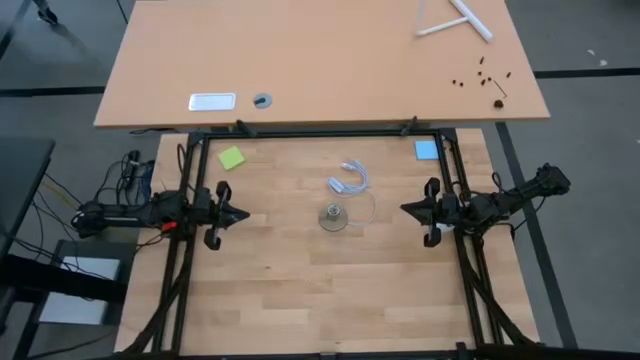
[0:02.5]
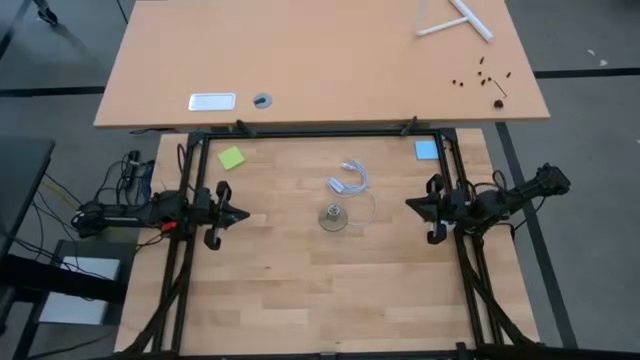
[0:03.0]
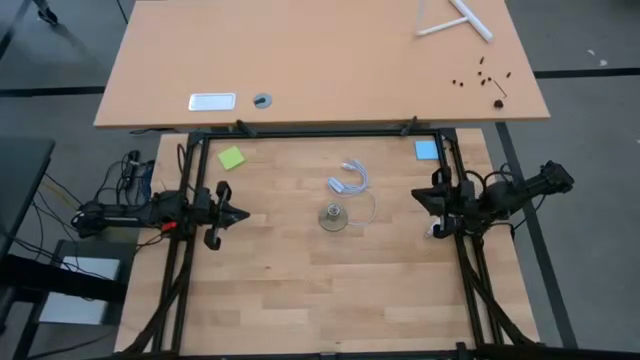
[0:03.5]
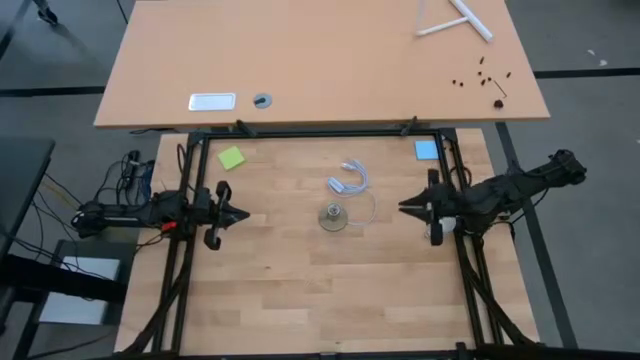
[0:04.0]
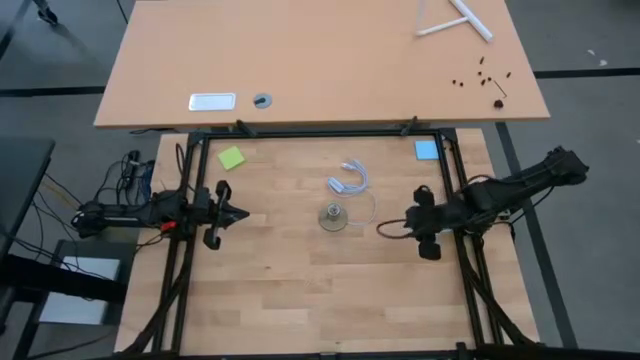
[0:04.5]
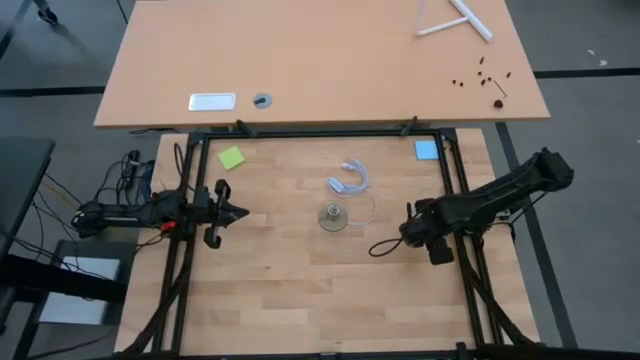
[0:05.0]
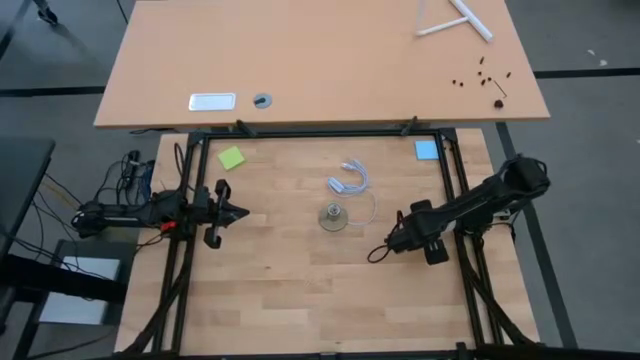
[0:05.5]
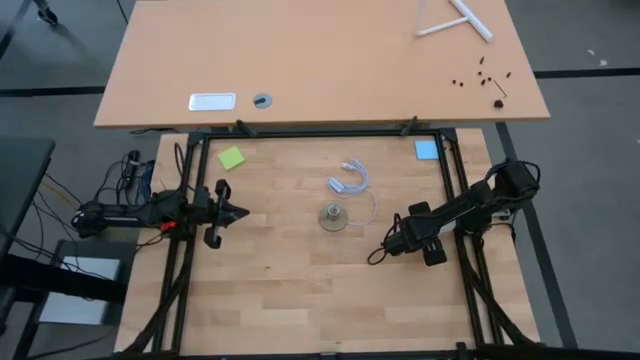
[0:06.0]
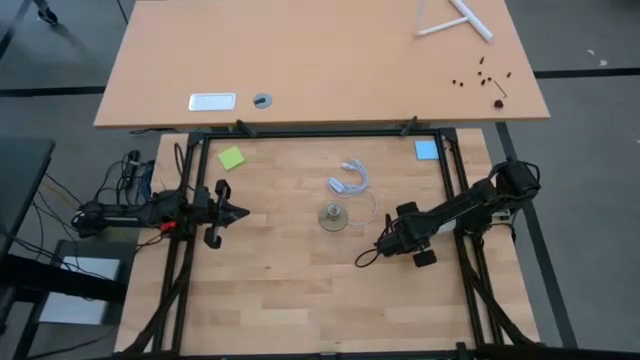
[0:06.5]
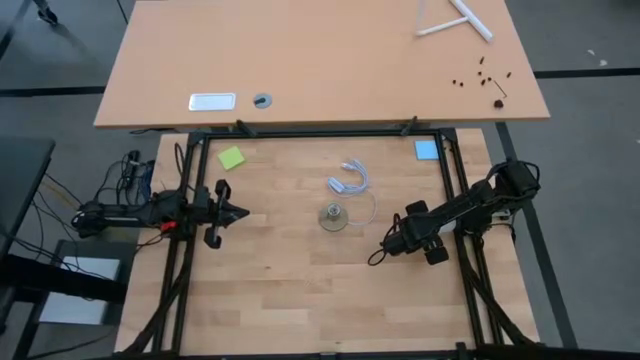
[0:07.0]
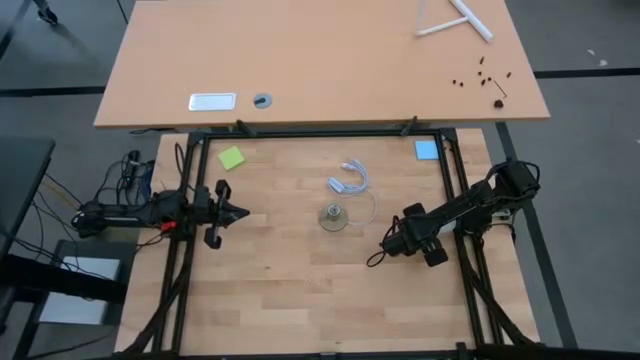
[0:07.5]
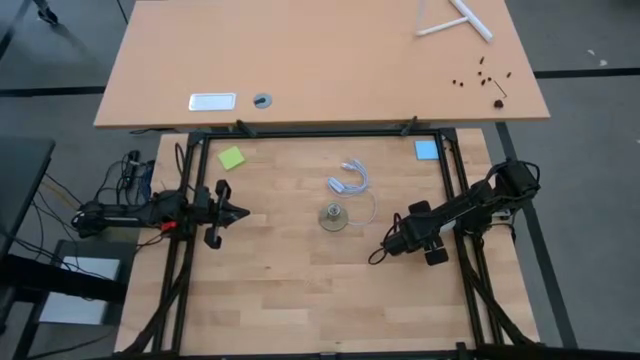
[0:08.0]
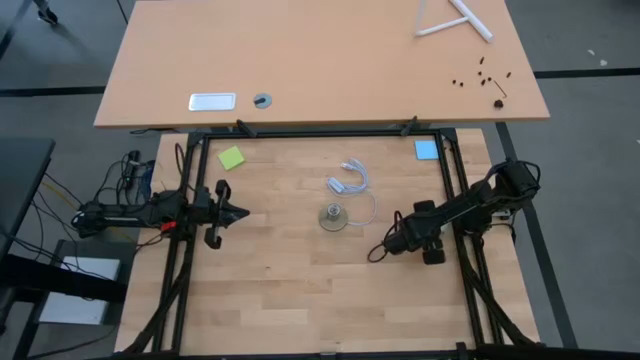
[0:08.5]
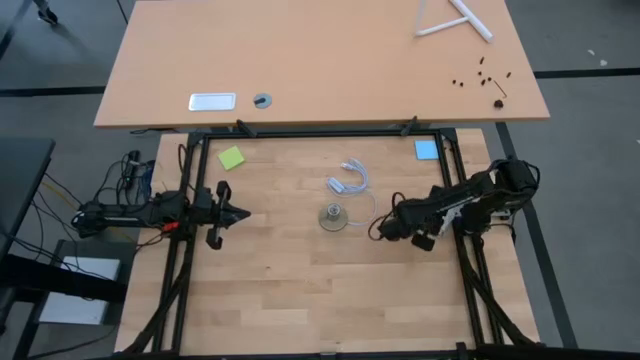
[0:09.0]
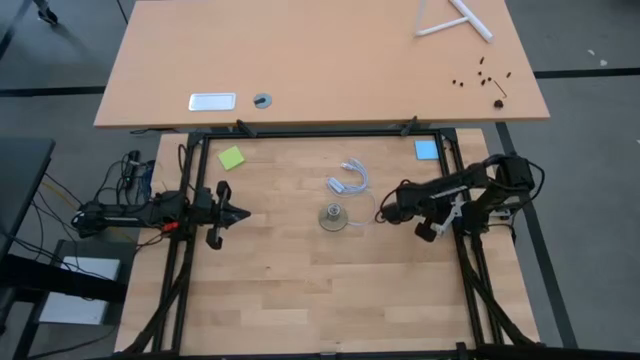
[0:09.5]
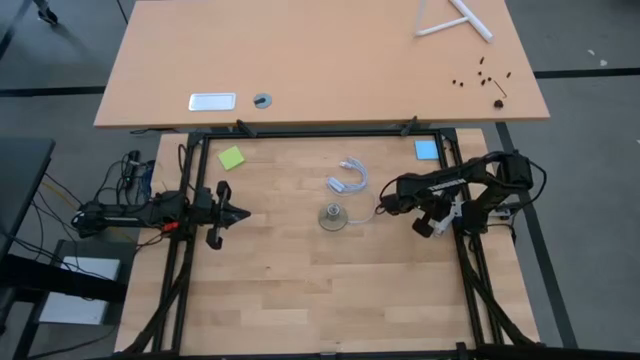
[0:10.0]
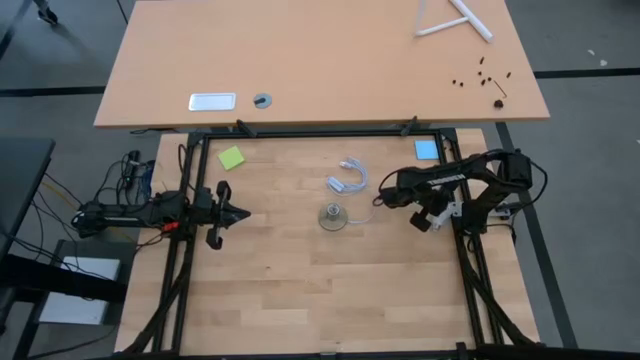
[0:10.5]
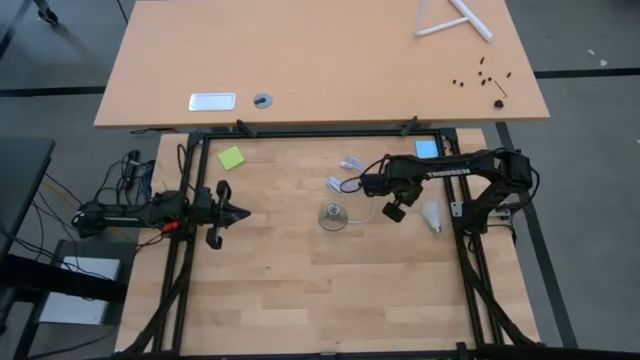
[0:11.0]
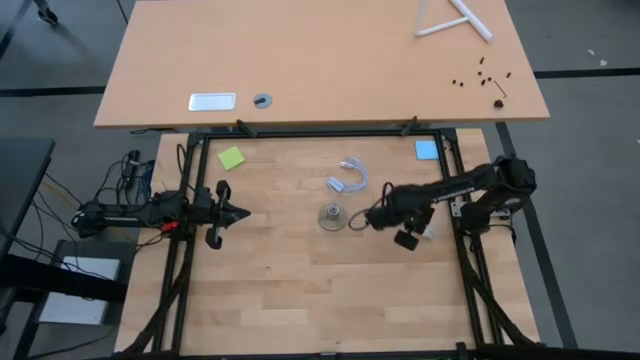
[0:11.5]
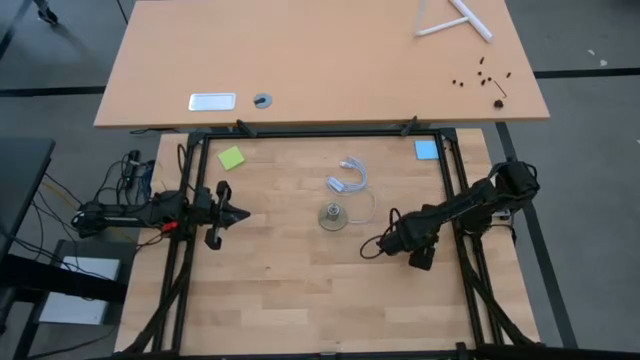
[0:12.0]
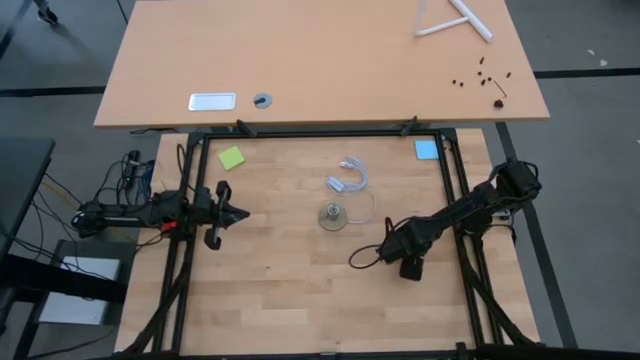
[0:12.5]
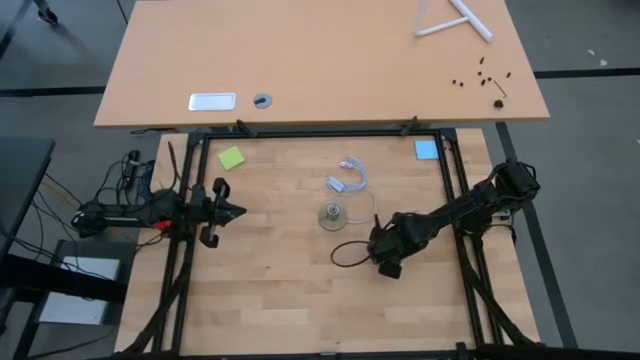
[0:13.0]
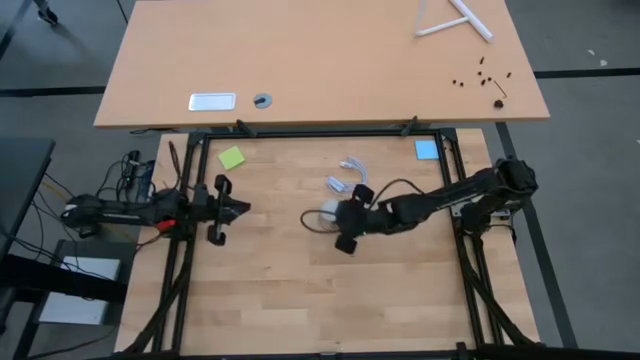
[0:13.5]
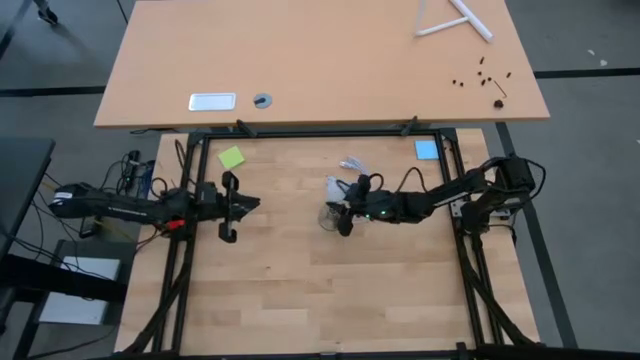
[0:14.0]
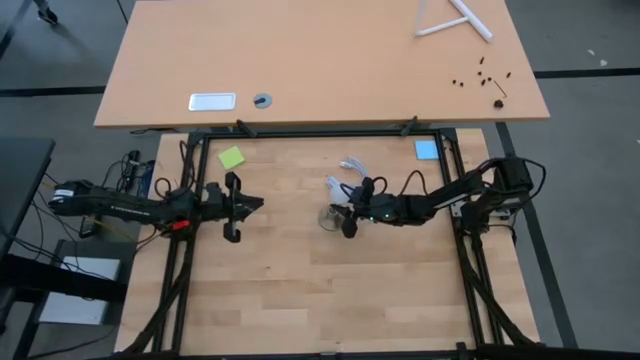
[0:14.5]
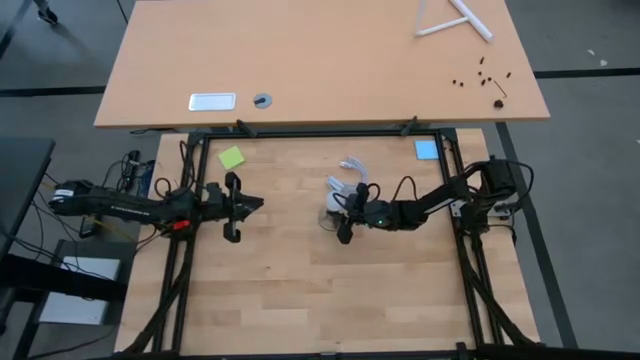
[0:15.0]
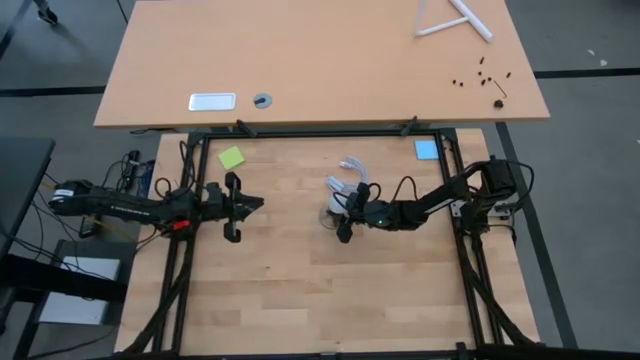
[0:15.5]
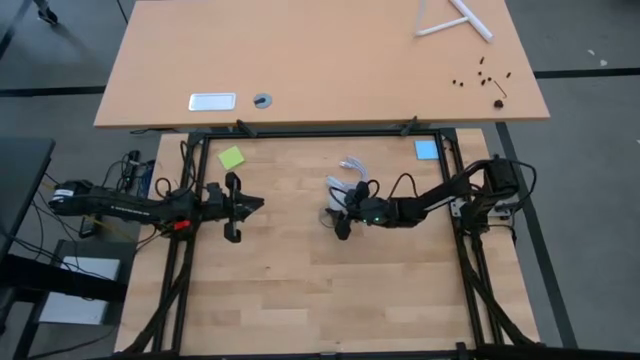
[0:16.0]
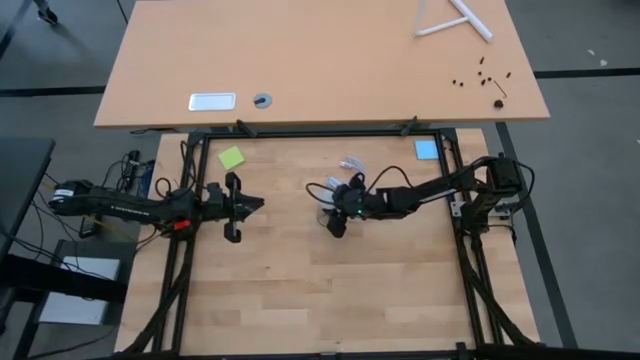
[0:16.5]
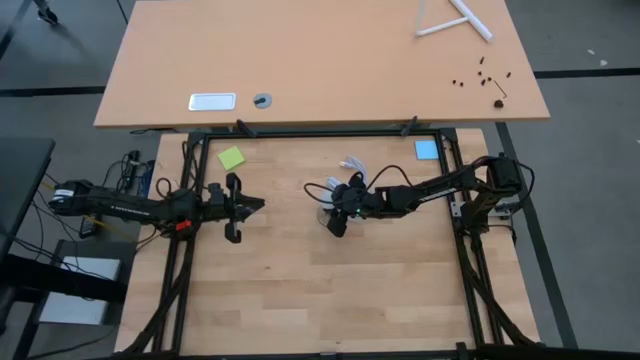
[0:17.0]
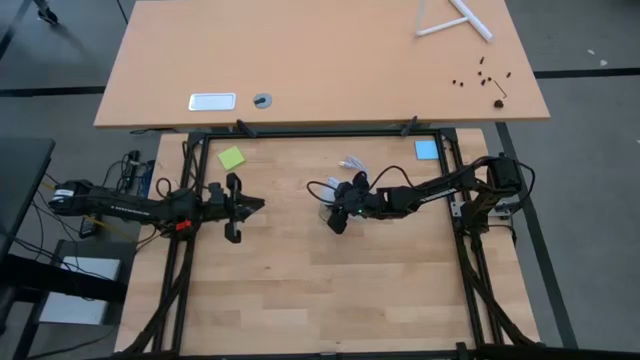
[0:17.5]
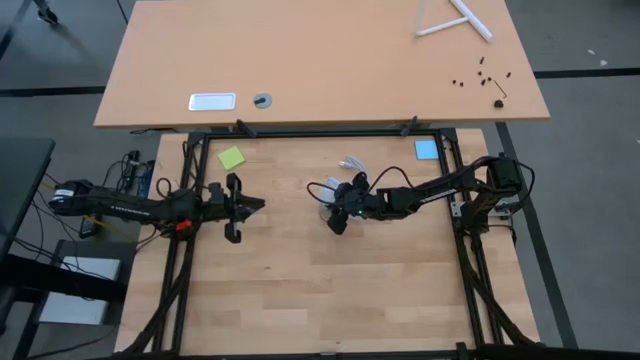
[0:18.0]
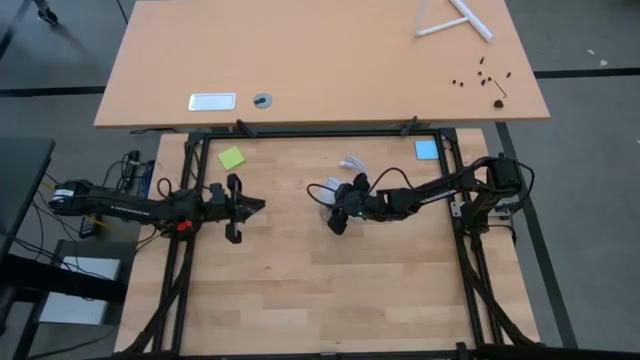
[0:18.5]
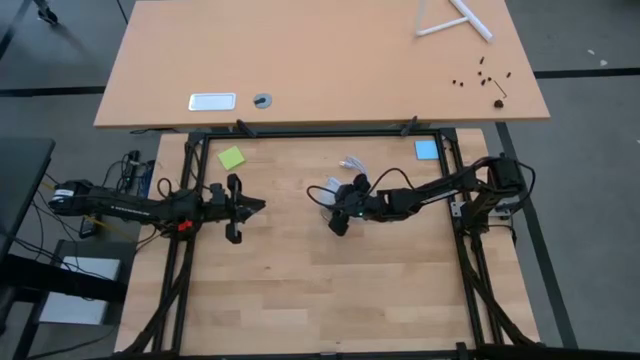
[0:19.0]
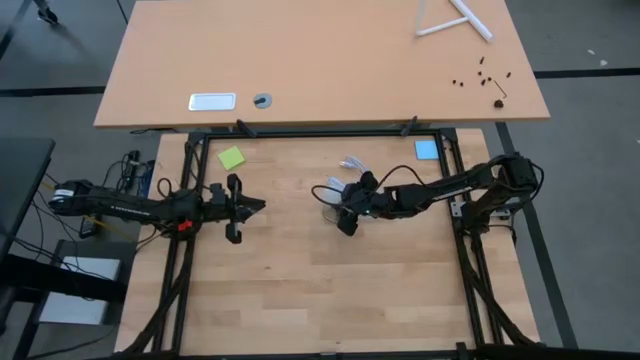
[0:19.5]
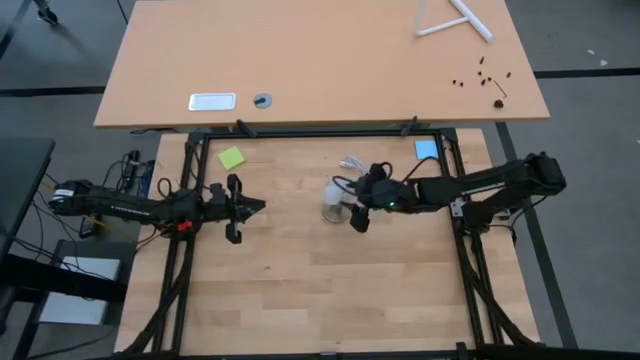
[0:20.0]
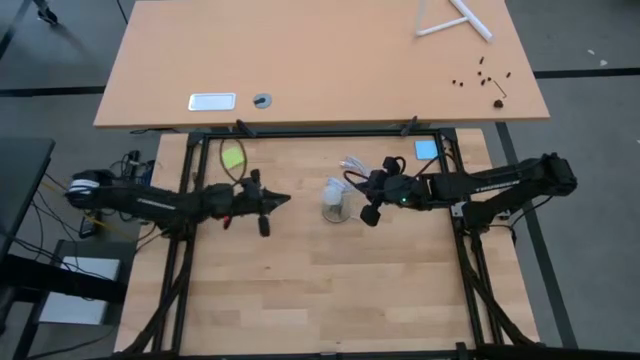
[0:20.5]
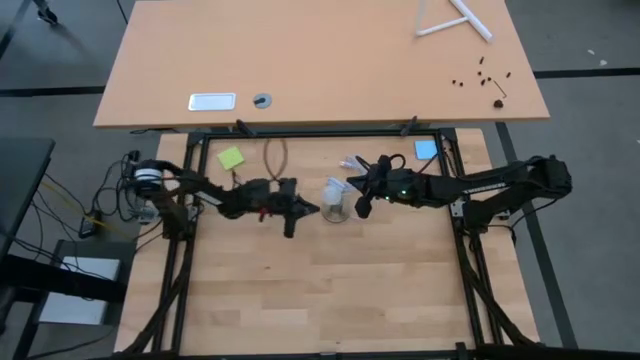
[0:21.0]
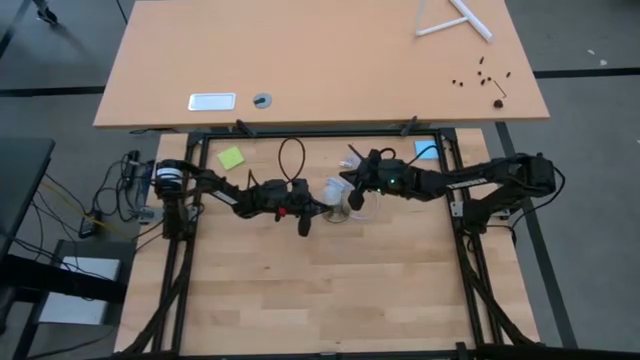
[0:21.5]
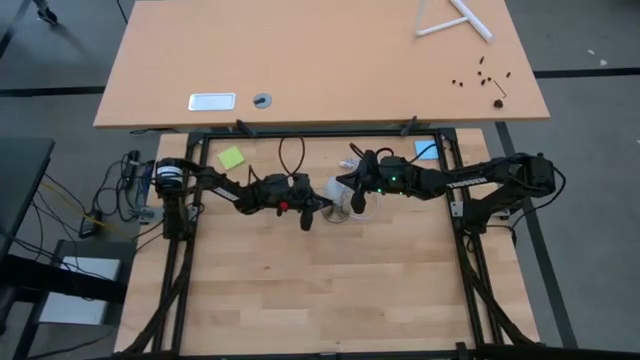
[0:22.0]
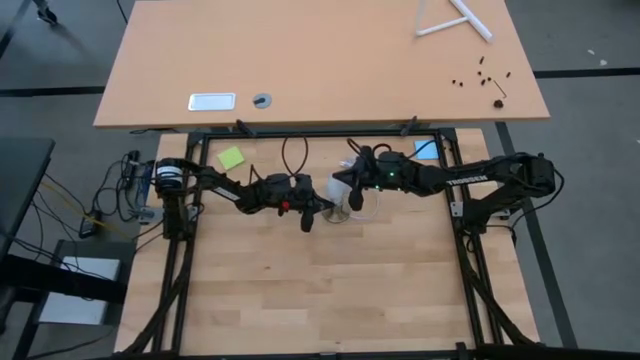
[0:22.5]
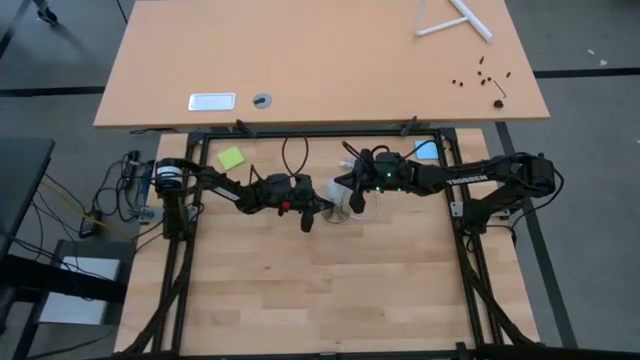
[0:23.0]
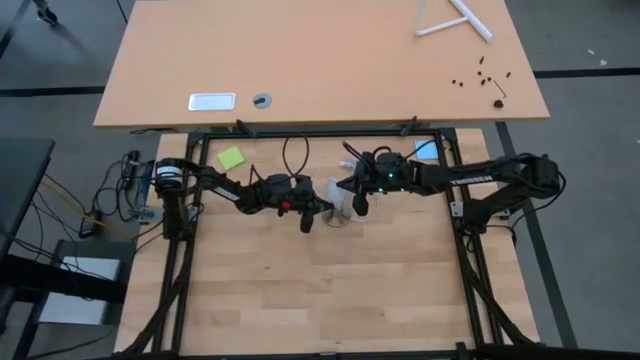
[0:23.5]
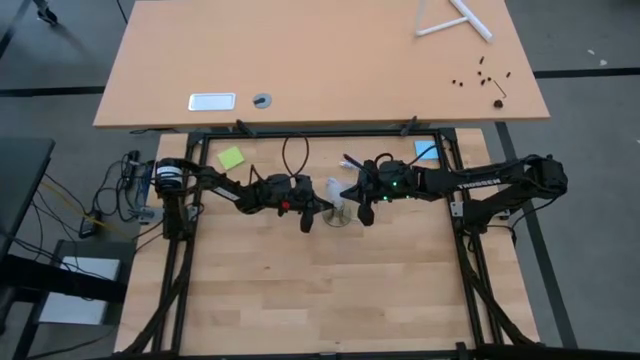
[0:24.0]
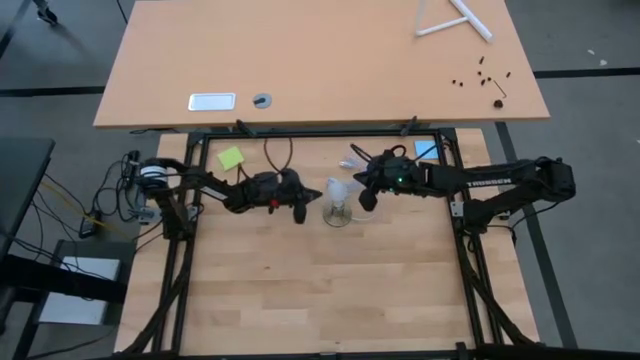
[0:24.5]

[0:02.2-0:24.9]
Task: Screw lightbulb
Insert the lightbulb into the lamp
